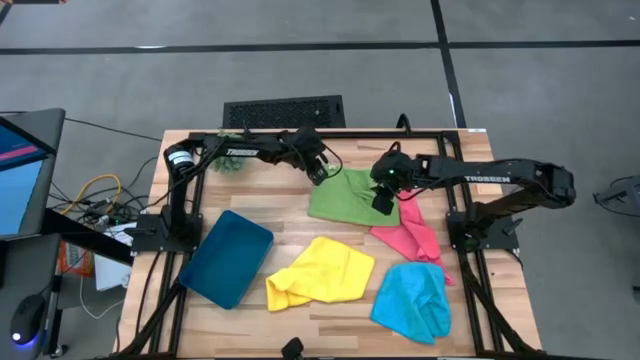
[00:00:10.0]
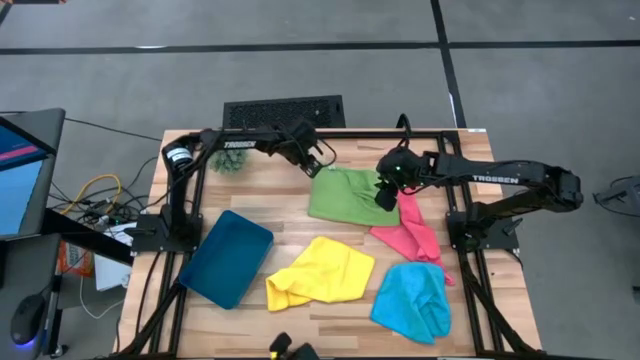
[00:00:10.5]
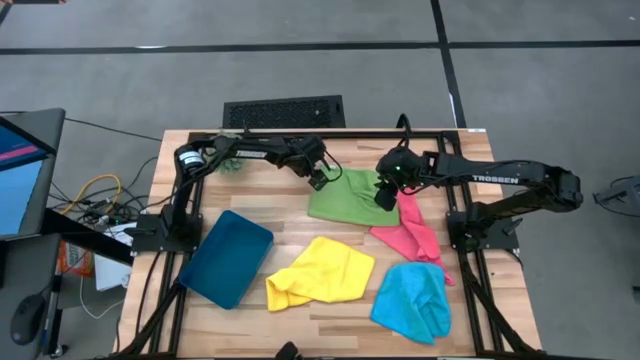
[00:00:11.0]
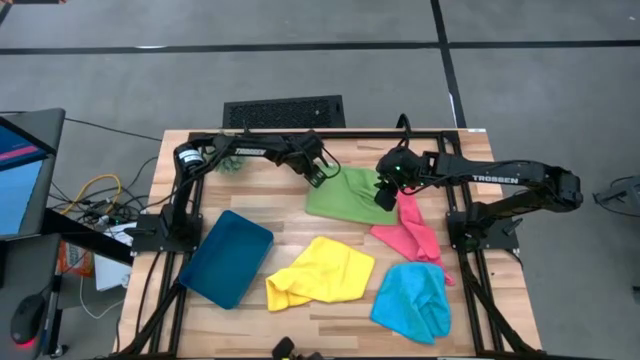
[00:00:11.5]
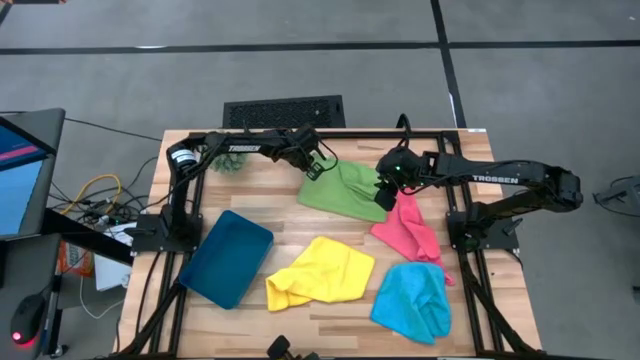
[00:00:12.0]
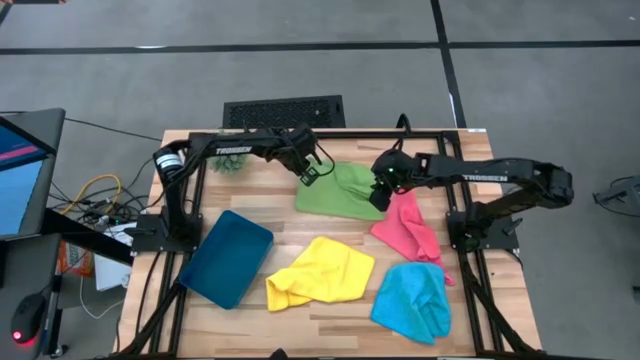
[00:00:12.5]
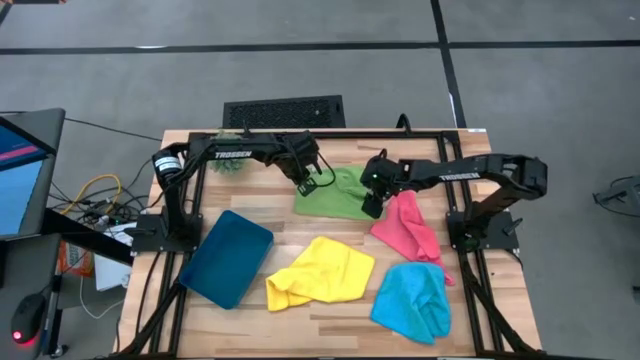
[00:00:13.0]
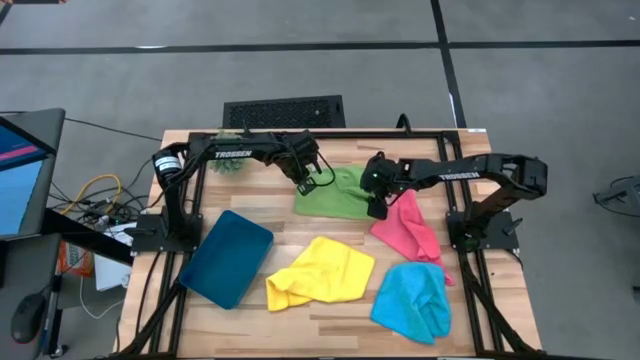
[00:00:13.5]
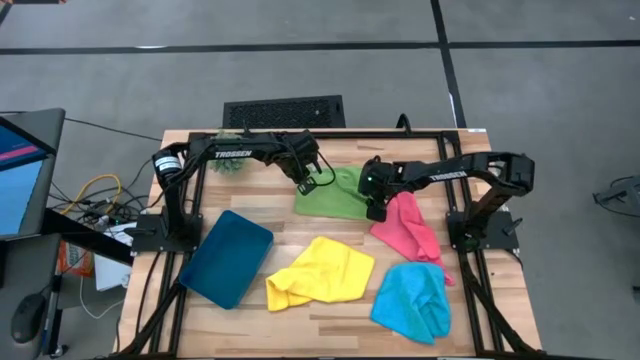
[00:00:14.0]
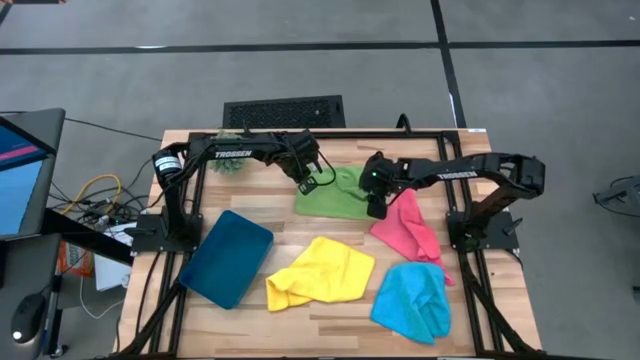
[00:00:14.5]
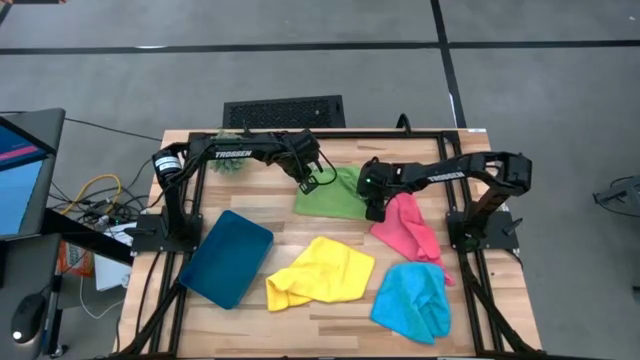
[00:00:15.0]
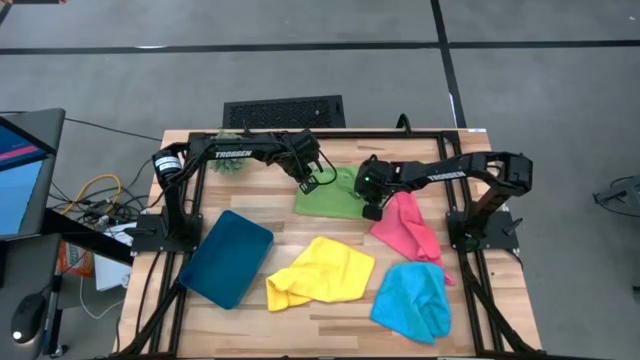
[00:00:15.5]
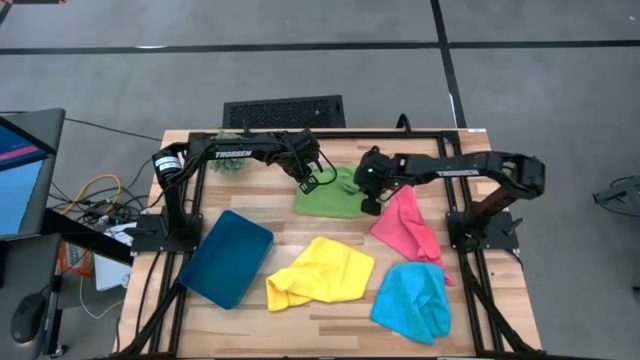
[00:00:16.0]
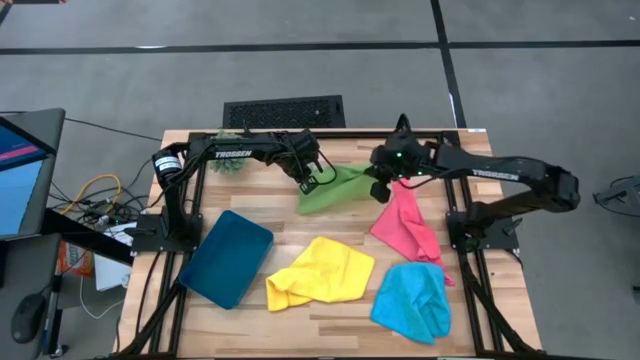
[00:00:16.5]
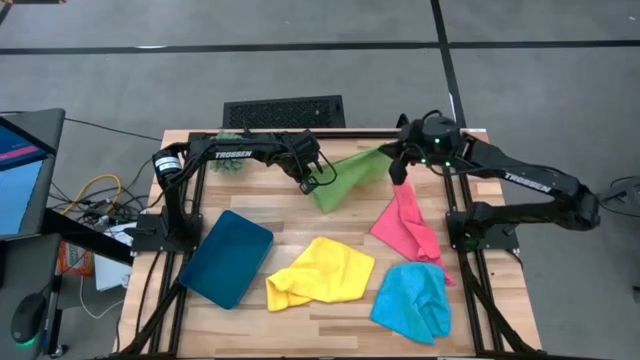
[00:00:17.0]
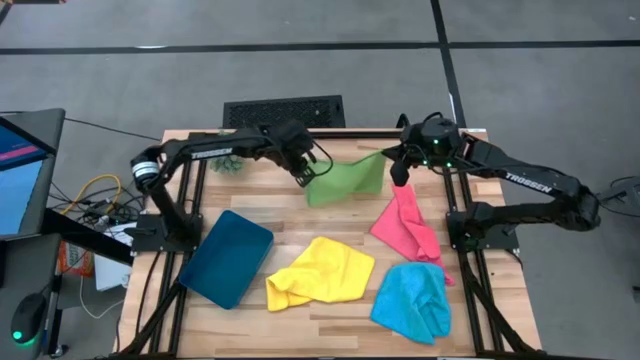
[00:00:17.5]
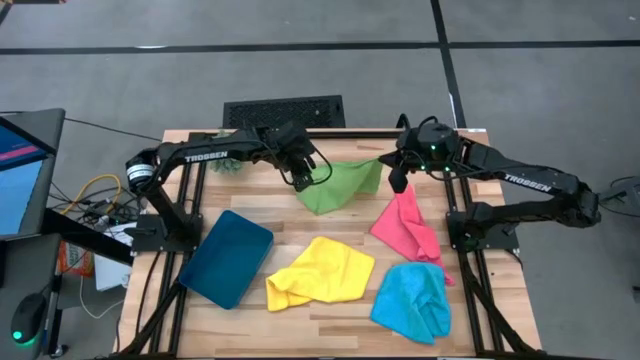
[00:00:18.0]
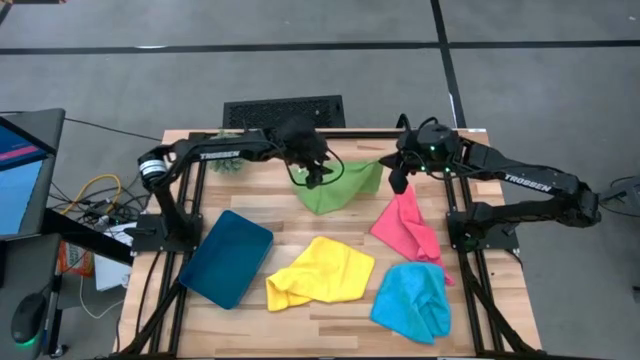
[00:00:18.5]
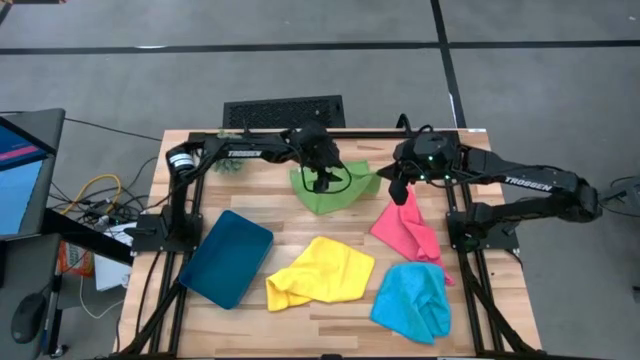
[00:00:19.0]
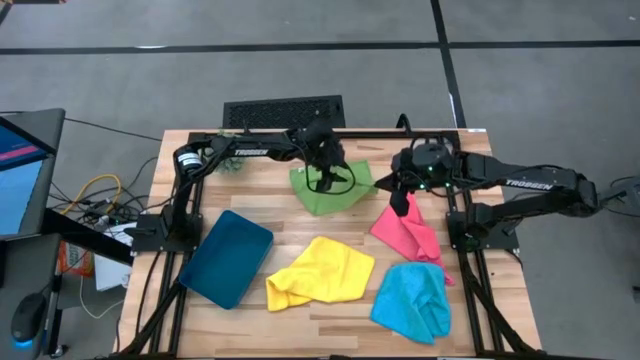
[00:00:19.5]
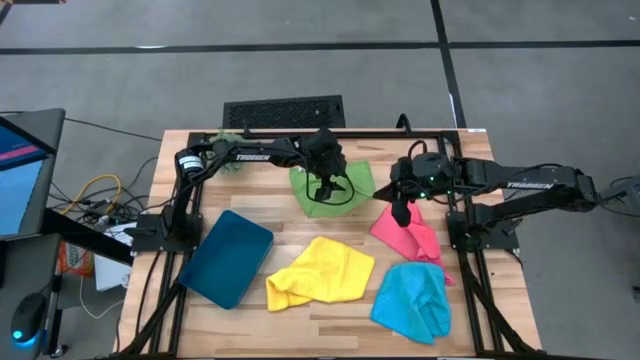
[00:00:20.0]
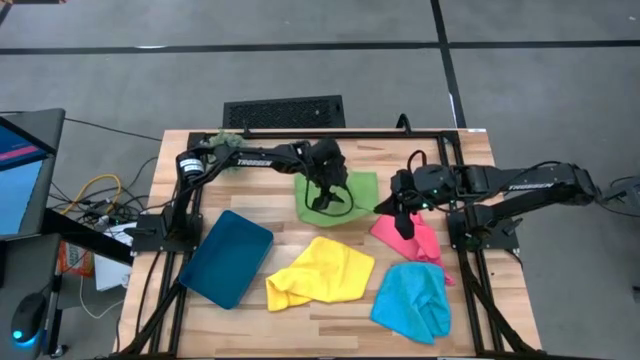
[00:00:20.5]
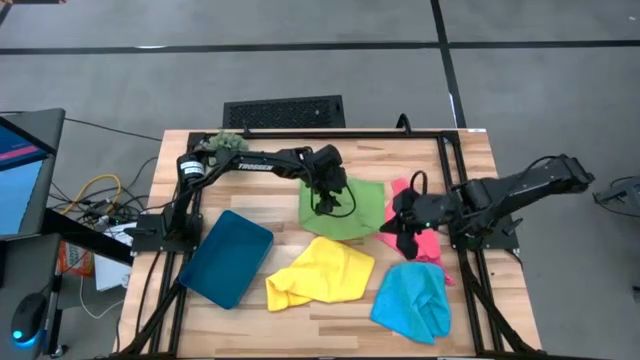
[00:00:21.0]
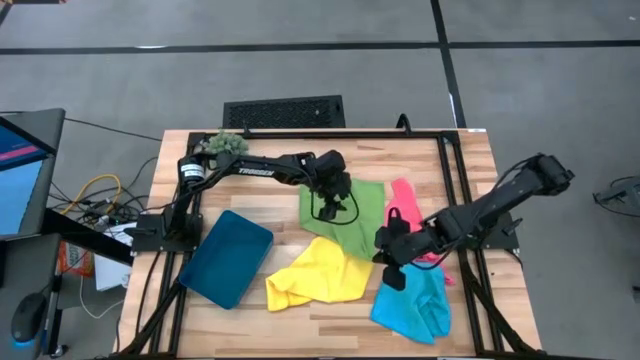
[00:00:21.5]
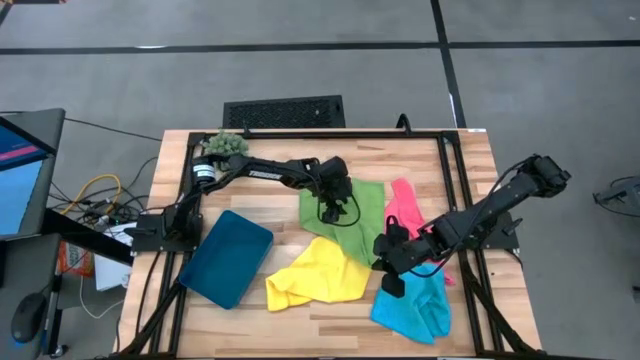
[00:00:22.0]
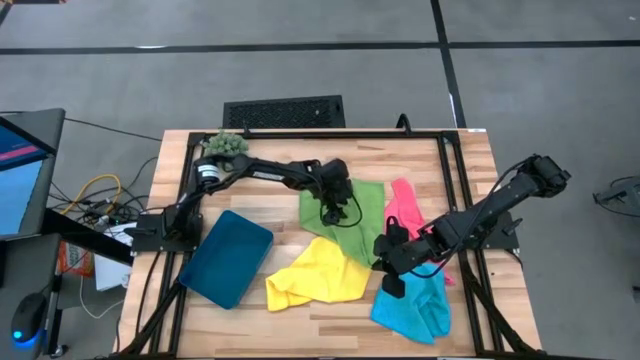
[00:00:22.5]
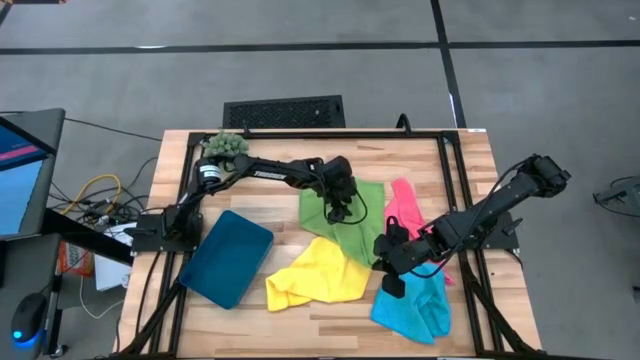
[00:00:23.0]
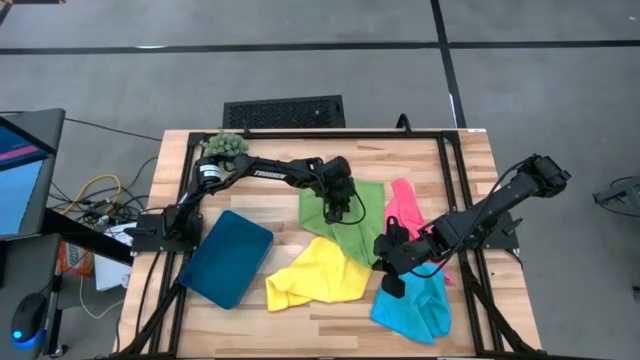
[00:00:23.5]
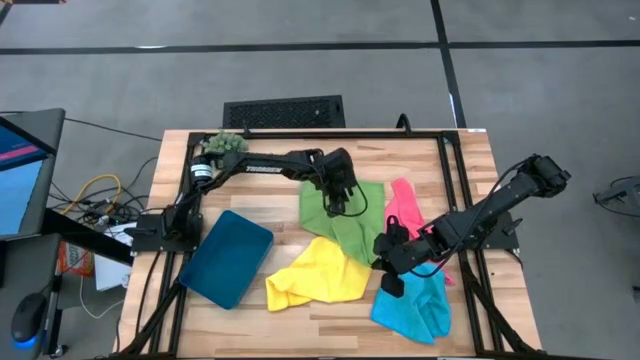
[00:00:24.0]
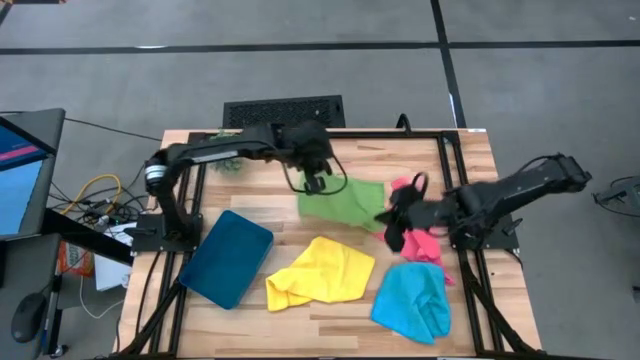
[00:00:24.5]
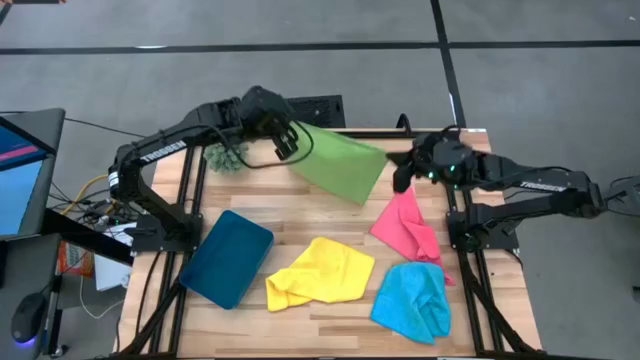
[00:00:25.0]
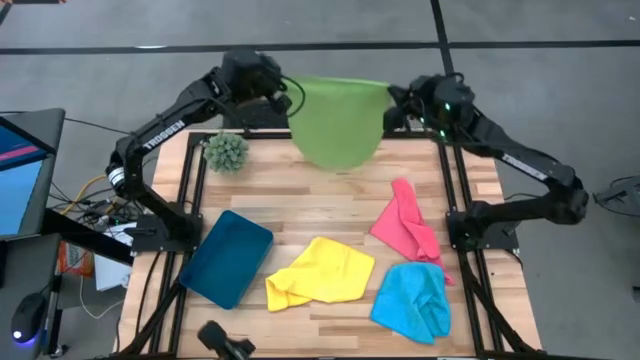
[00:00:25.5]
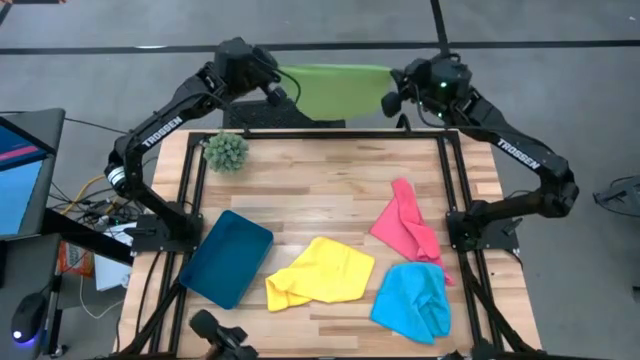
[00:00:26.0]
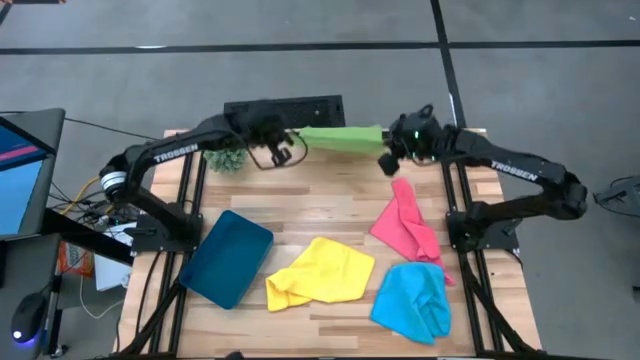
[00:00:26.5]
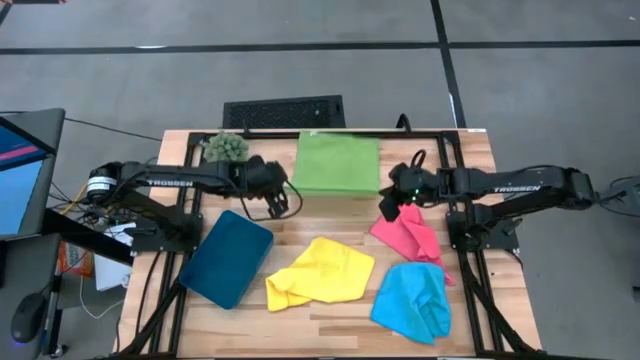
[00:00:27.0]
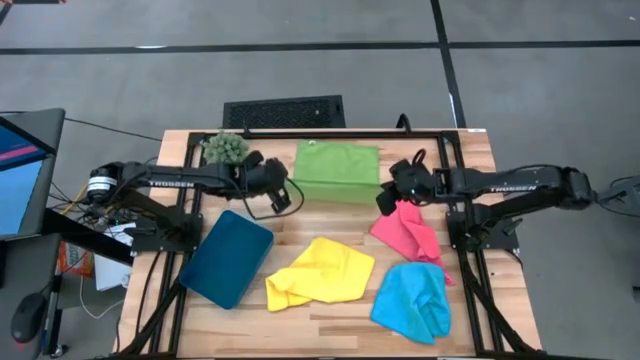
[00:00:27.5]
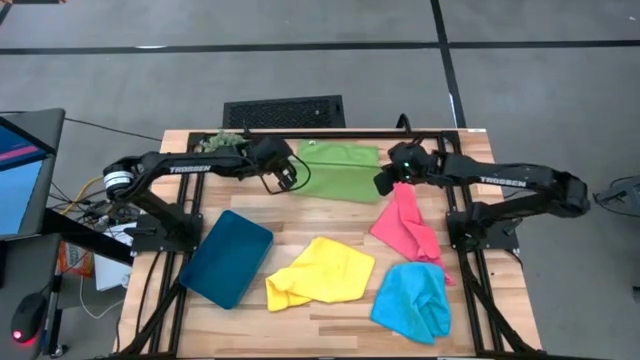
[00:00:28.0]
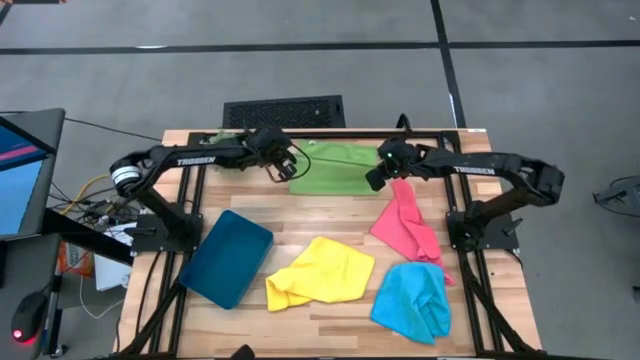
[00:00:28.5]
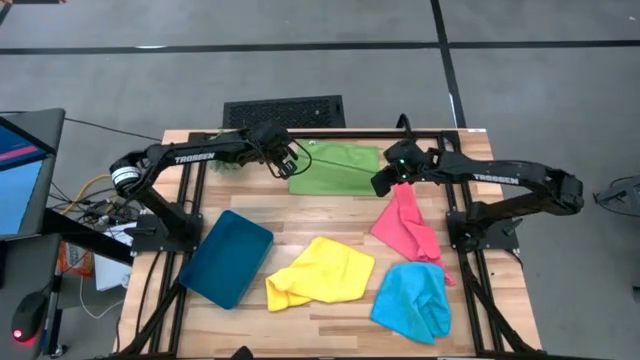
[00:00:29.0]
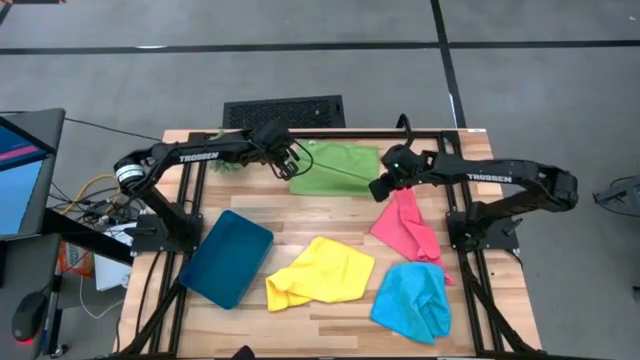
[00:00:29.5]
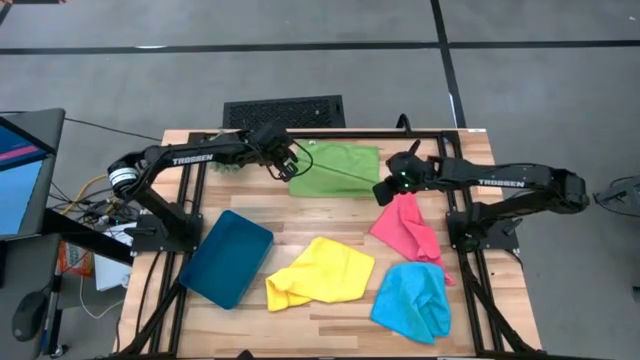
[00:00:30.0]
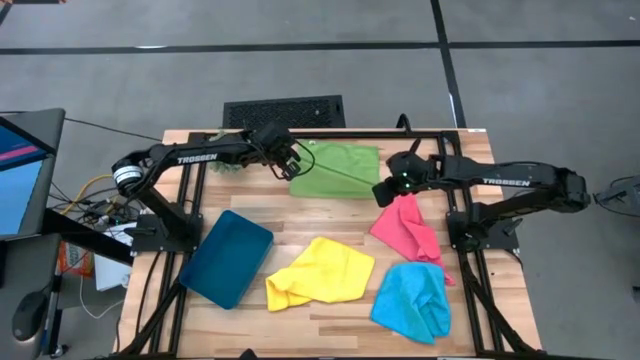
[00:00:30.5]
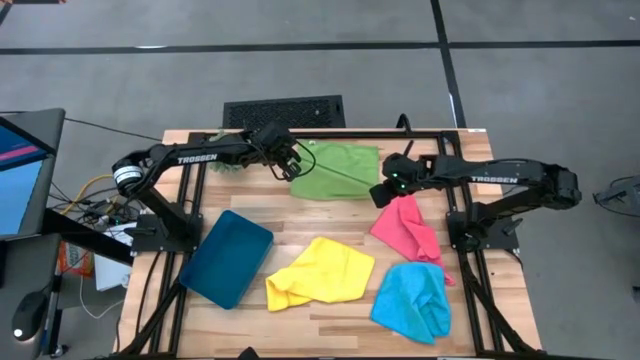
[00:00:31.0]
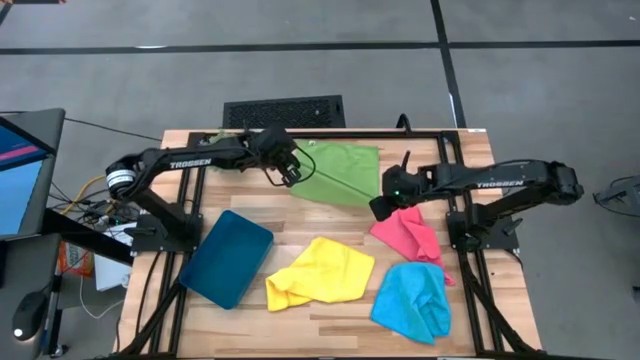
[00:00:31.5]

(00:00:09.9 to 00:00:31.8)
Task: Fold microfiber towels
Fold the green microfiber towel
